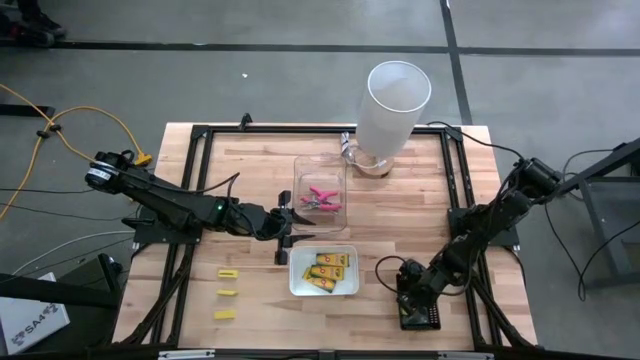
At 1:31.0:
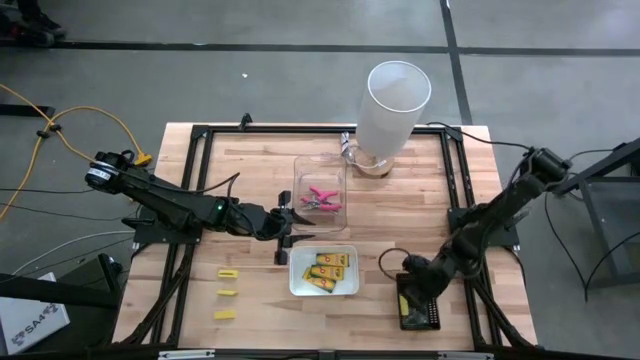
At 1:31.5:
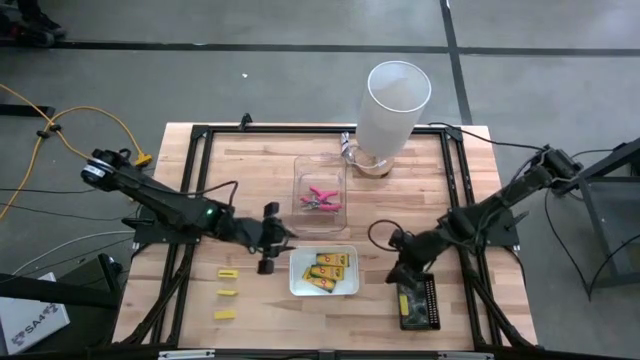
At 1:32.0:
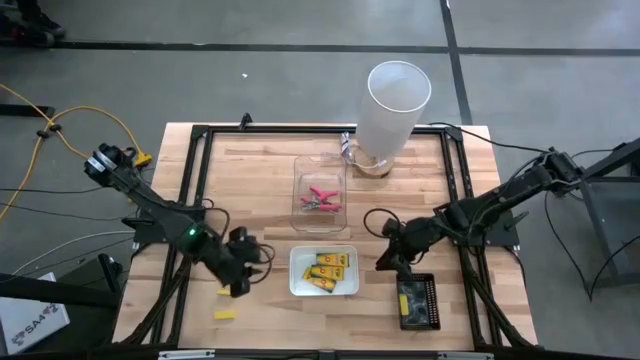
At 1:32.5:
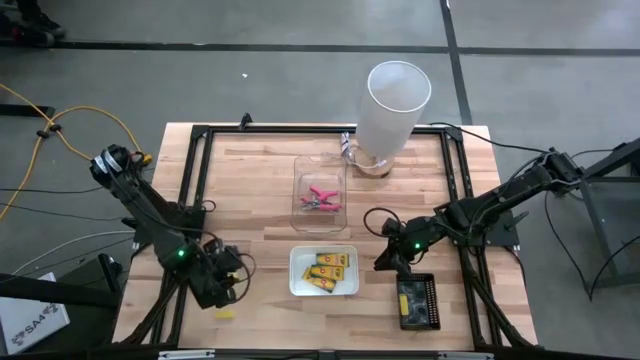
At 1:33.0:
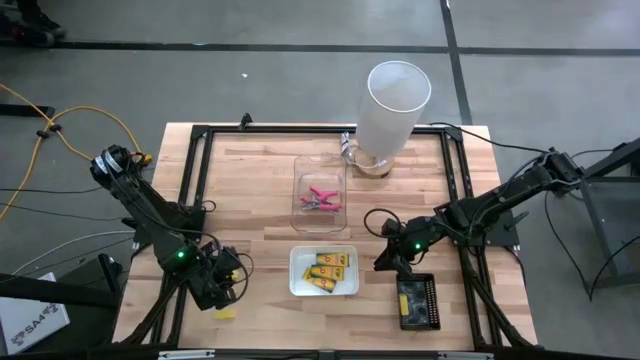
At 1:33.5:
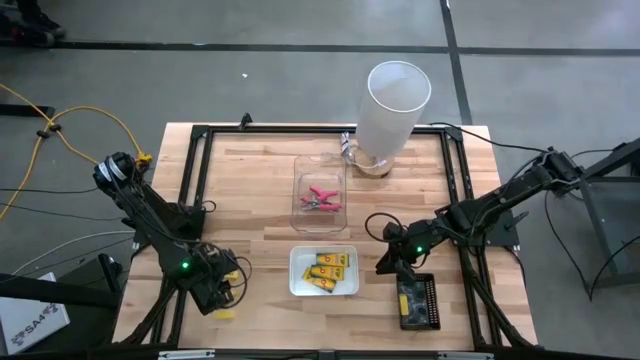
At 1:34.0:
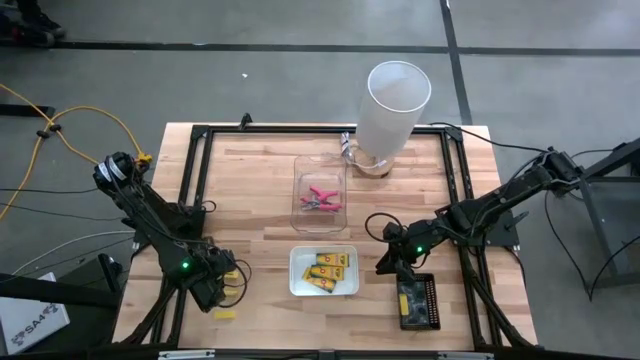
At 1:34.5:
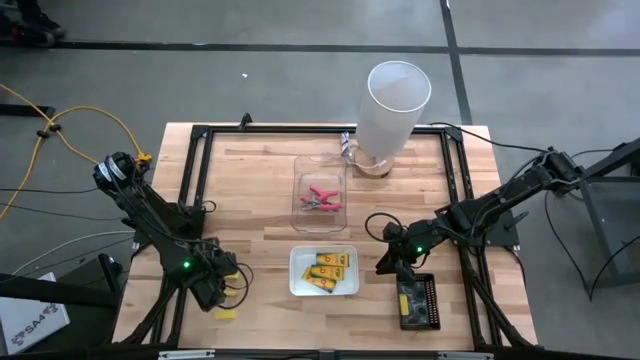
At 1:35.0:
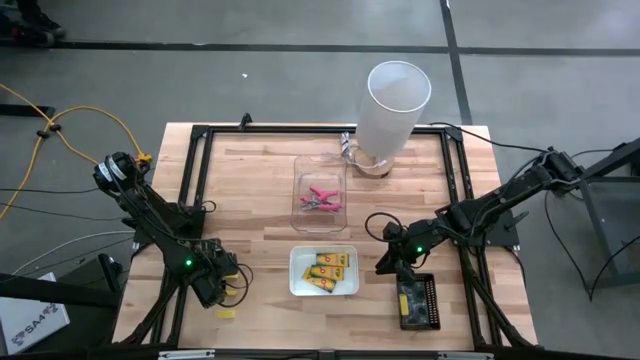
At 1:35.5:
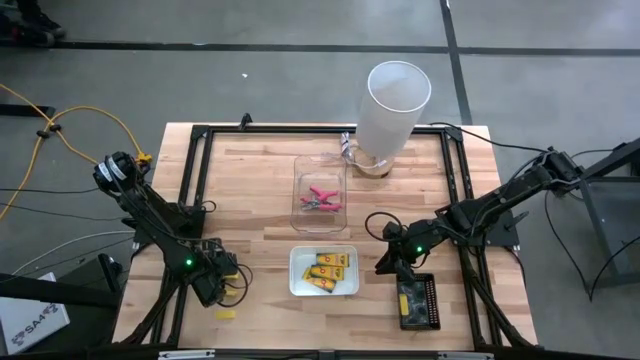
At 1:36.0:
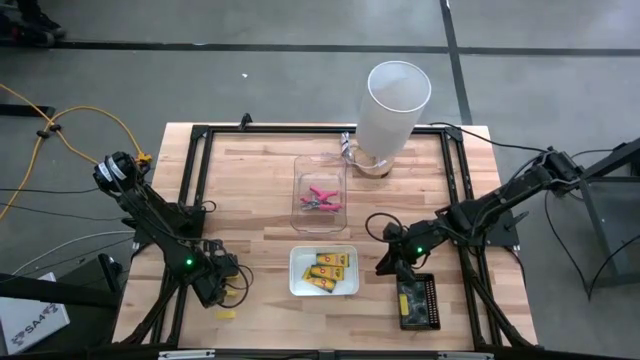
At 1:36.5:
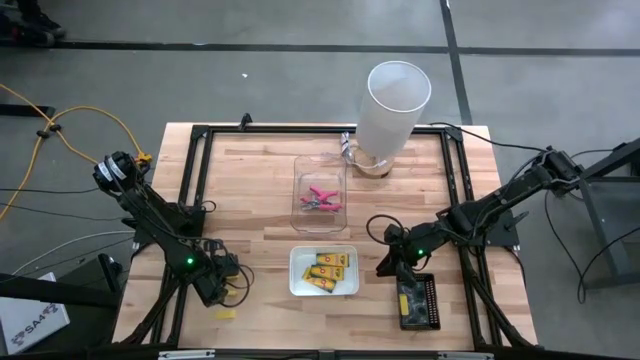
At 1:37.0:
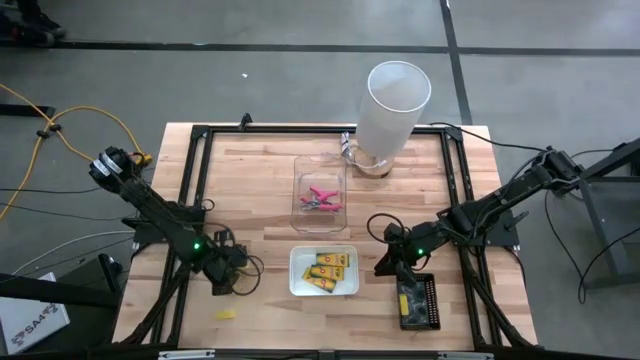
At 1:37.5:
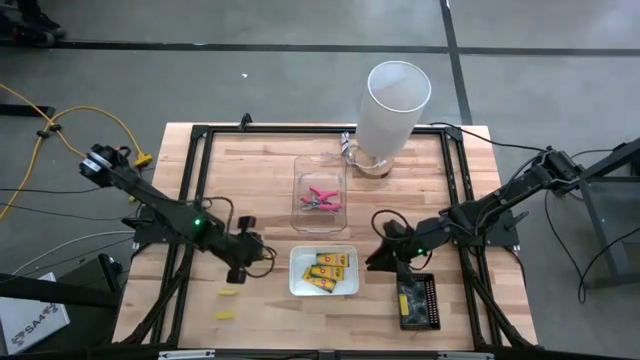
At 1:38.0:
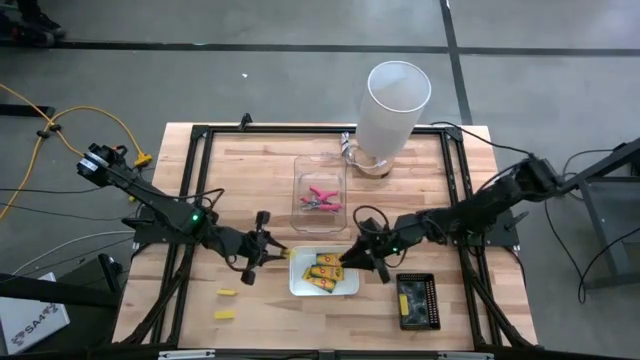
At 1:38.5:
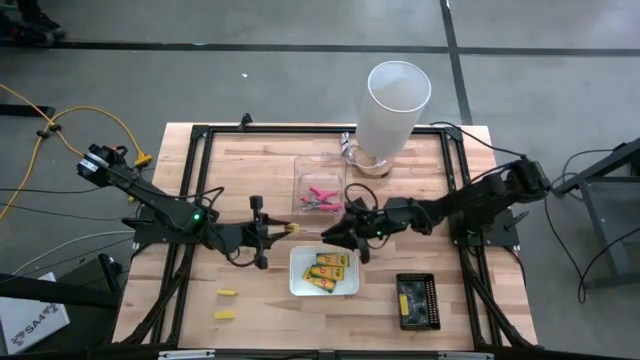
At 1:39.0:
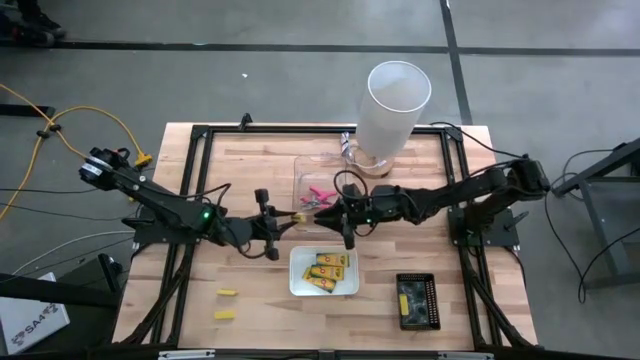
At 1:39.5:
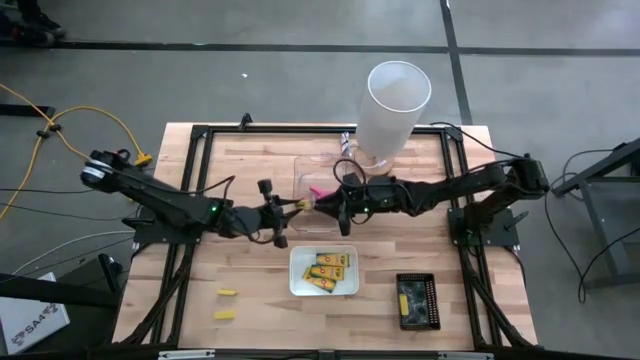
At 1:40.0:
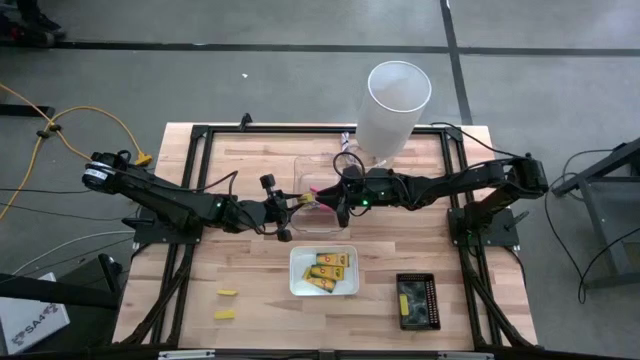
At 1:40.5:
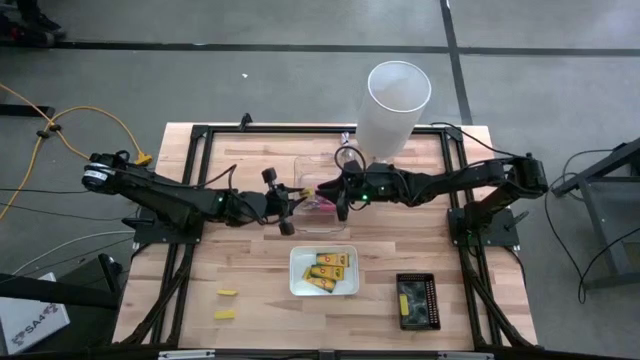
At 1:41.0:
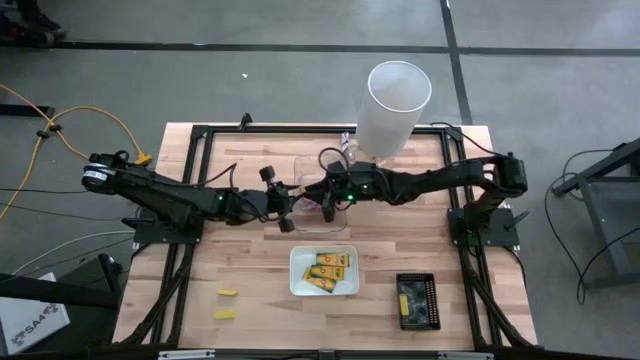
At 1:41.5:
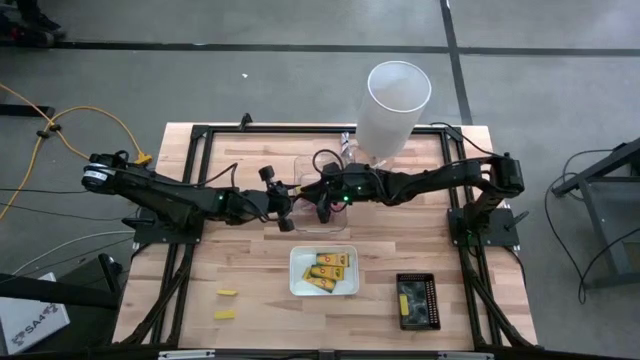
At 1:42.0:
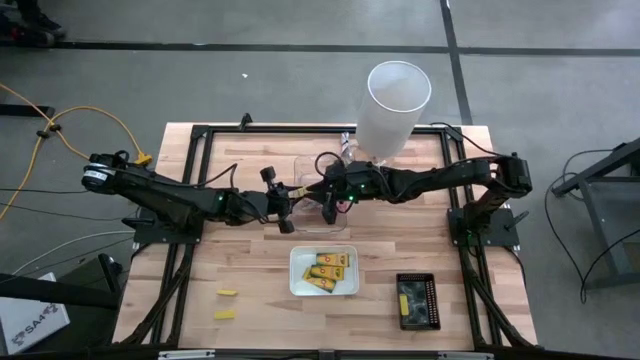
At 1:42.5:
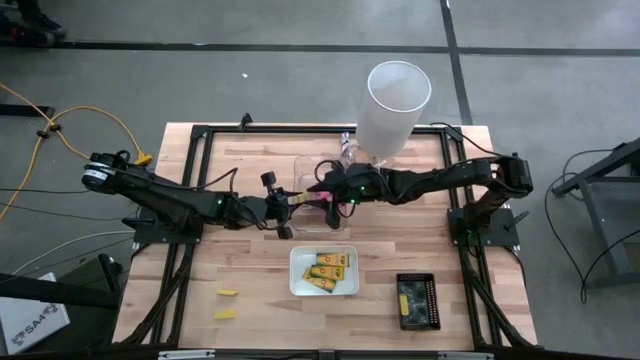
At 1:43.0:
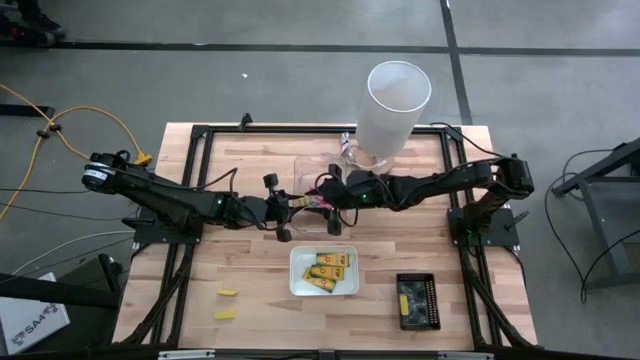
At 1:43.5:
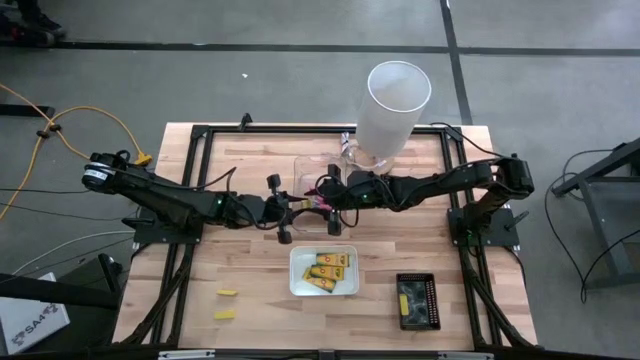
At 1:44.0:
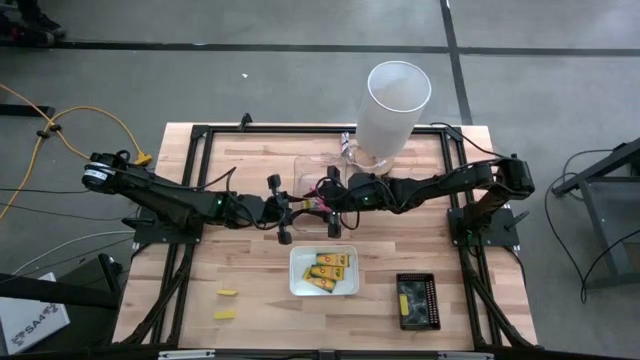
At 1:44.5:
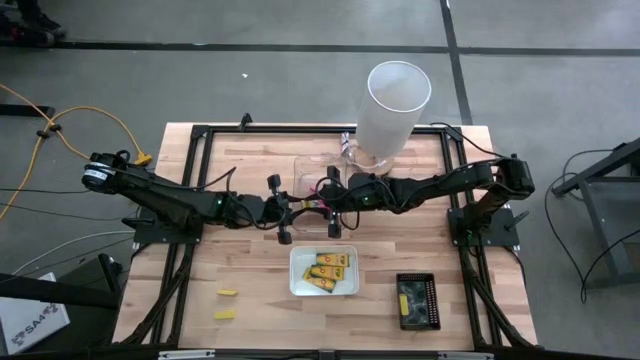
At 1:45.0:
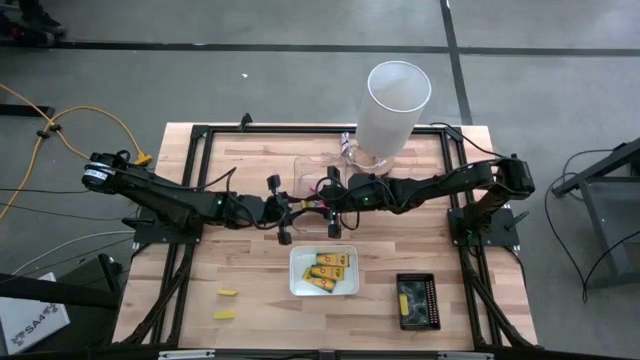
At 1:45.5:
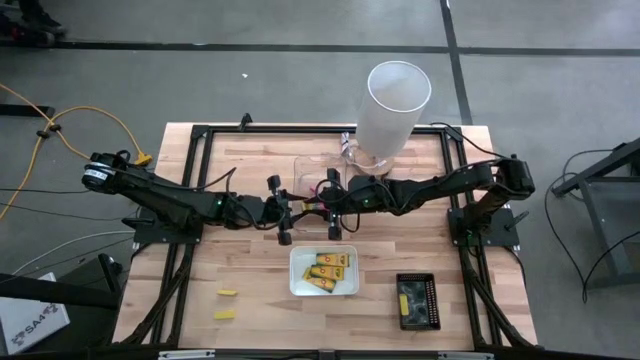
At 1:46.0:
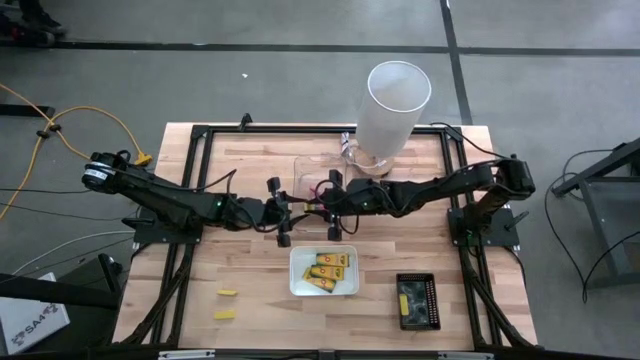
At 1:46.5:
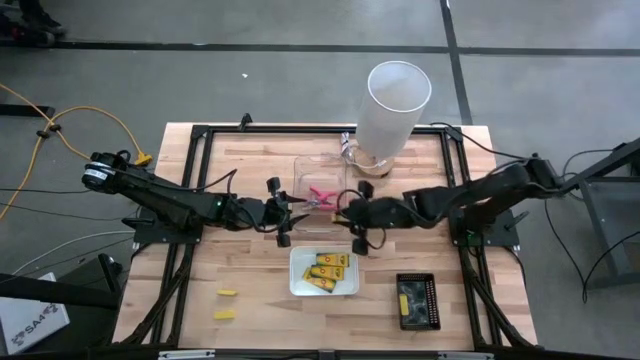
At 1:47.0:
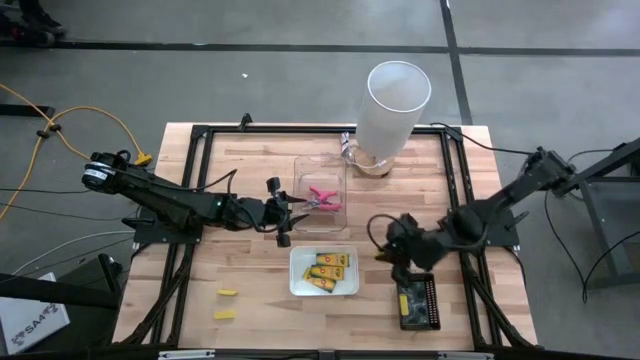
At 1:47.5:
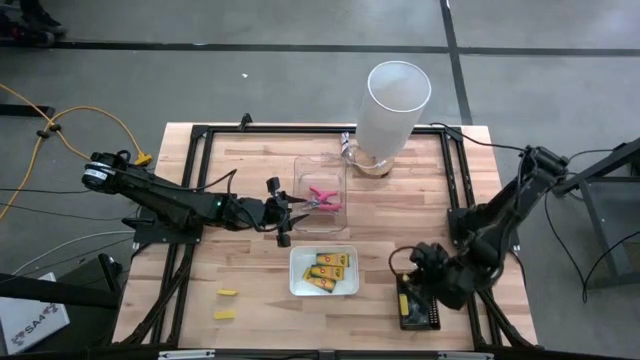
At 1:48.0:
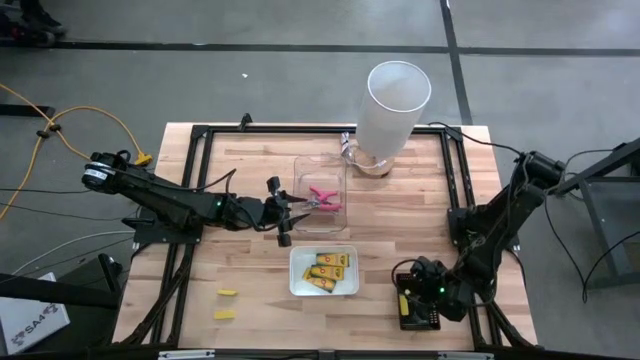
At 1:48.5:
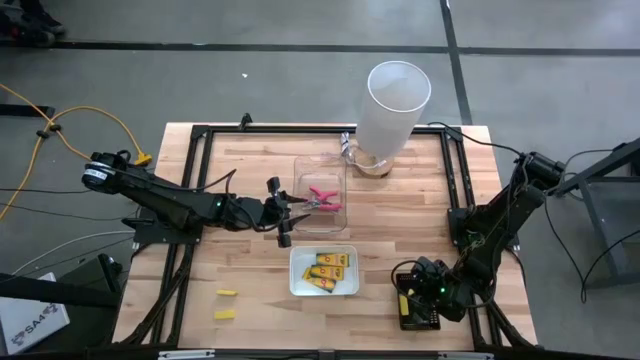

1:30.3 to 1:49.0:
Task: Pick & Place School Supplies
Put the yellow eraser into the black bin

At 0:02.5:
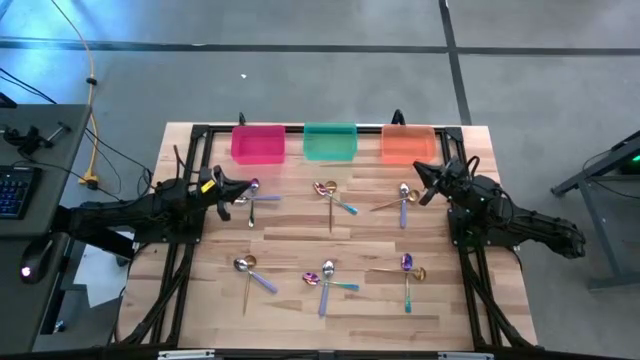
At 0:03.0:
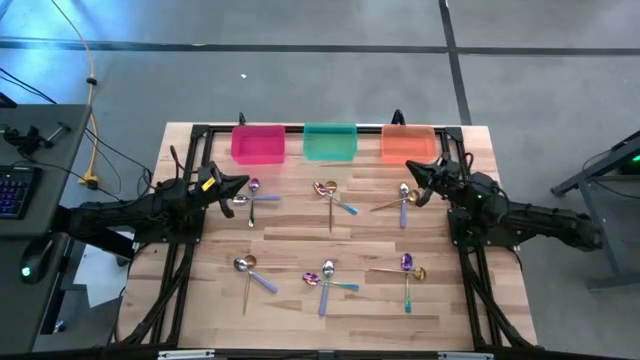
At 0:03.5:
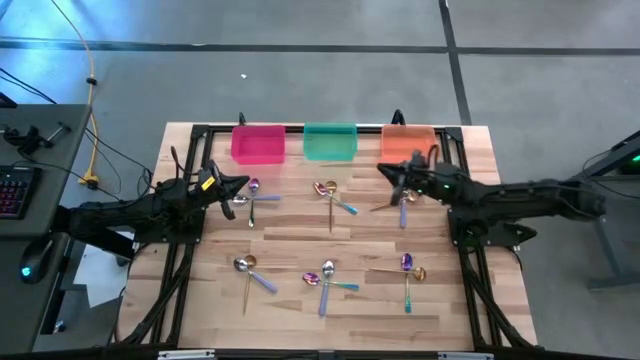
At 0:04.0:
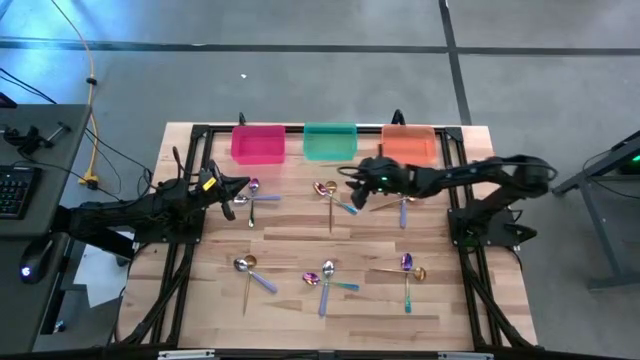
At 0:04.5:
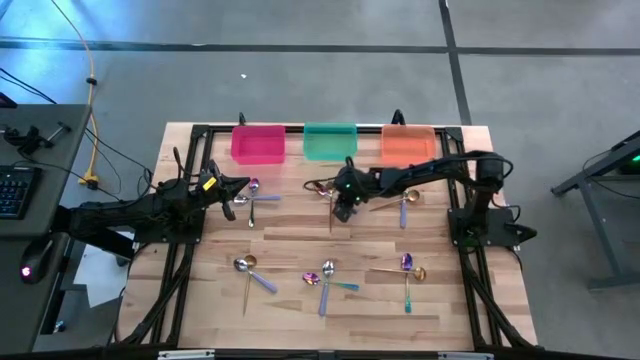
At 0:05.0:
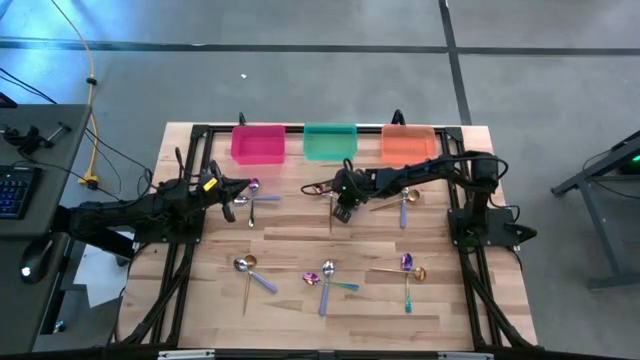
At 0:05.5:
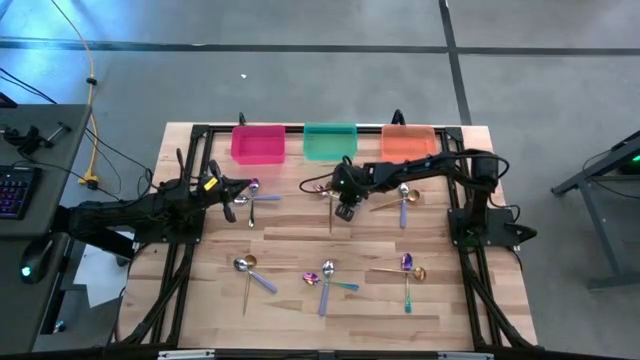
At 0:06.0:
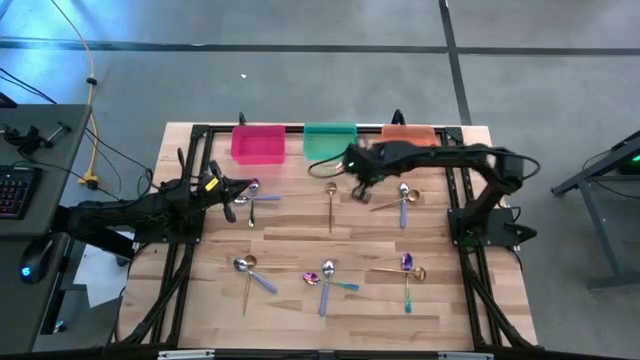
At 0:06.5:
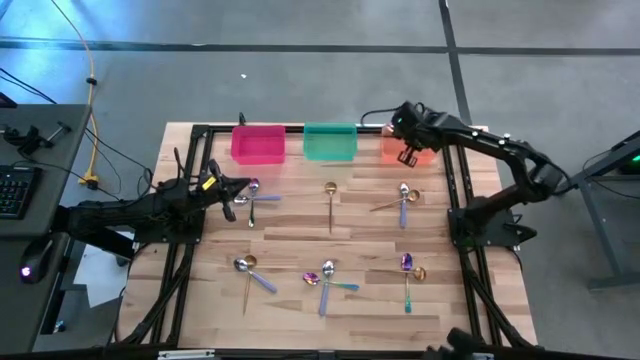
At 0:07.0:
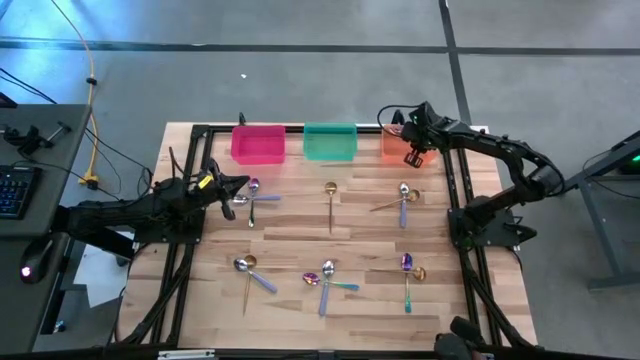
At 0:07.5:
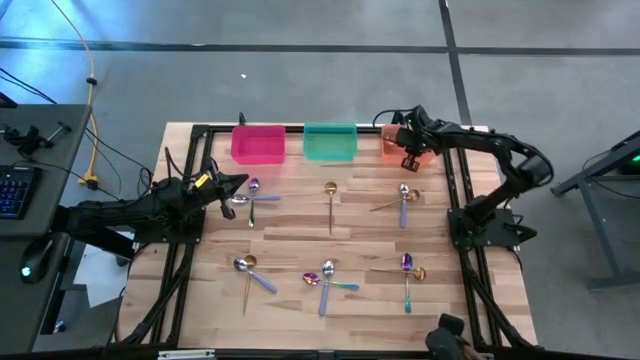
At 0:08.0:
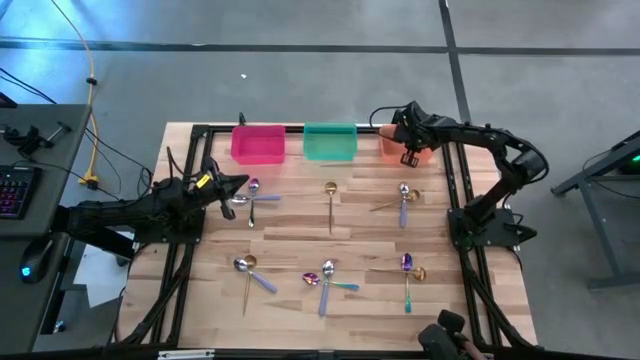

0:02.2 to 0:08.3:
Task: Sort silverware by color (type)
Put the top right silver spoon into the orange bin
